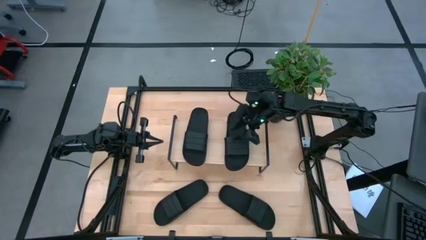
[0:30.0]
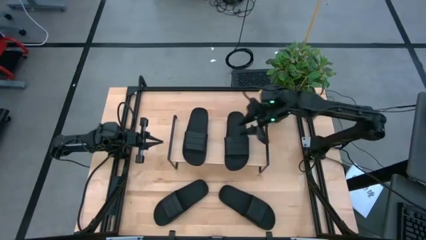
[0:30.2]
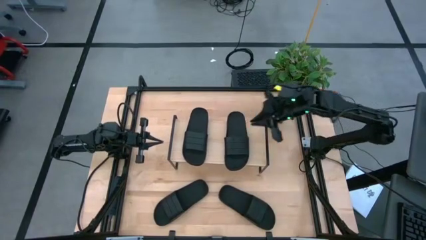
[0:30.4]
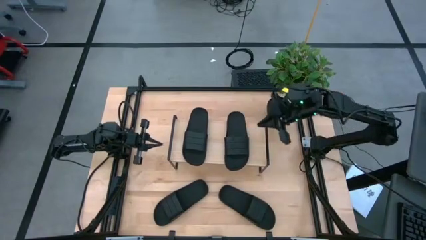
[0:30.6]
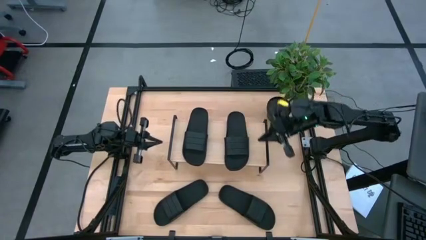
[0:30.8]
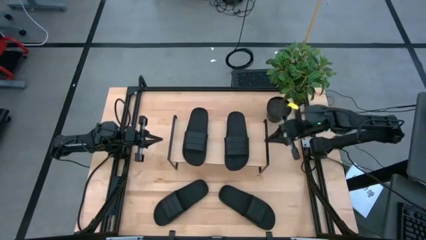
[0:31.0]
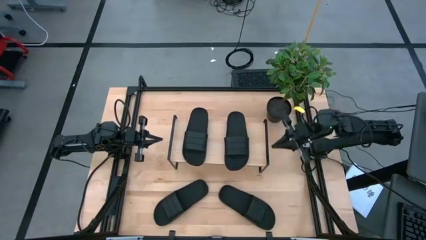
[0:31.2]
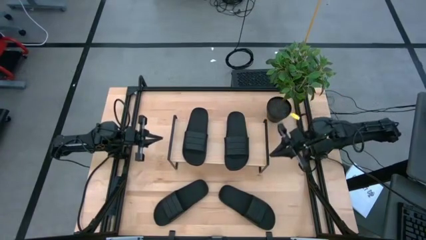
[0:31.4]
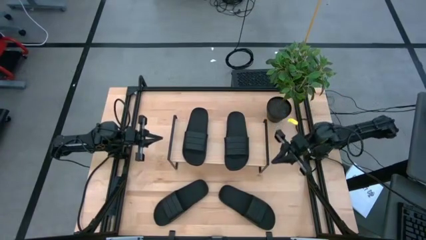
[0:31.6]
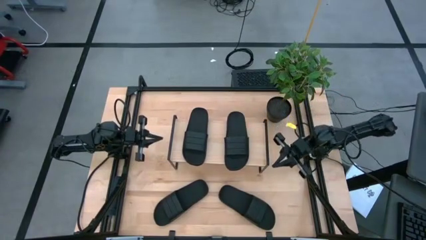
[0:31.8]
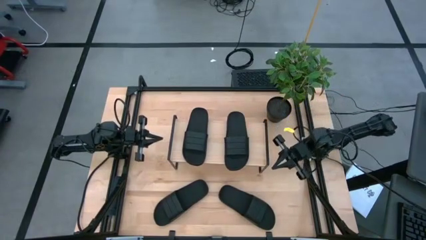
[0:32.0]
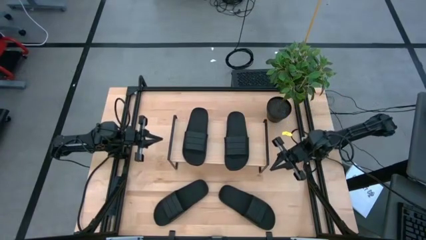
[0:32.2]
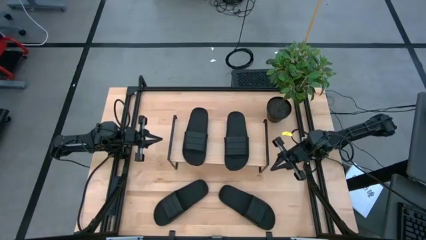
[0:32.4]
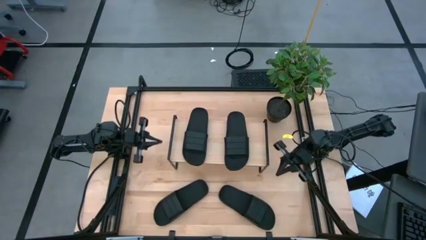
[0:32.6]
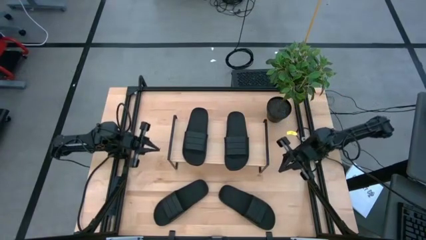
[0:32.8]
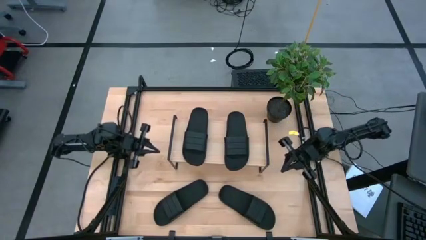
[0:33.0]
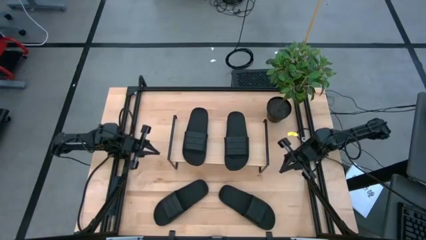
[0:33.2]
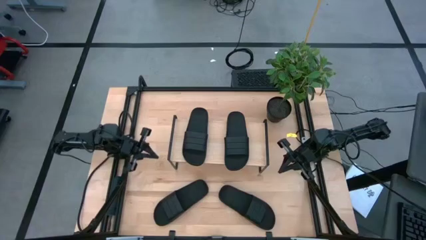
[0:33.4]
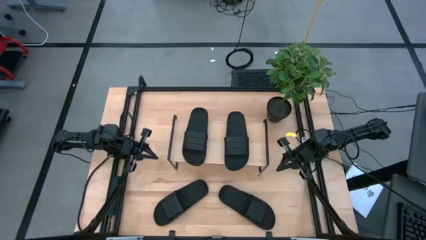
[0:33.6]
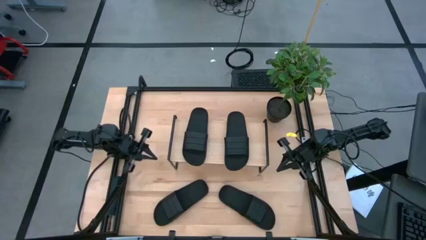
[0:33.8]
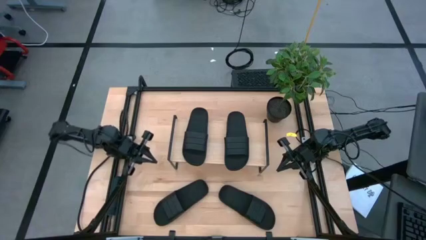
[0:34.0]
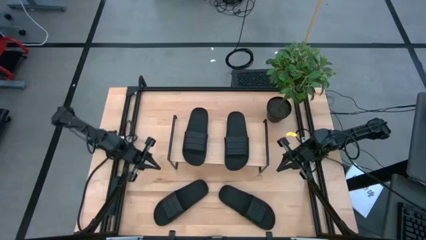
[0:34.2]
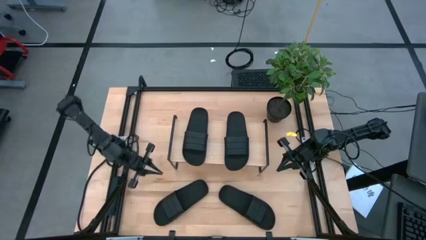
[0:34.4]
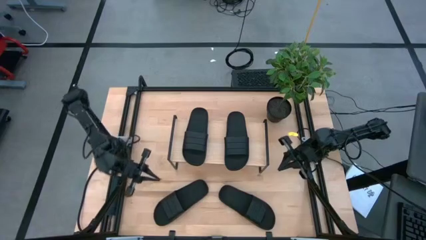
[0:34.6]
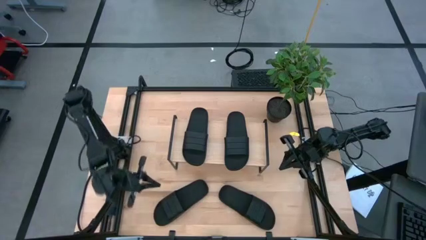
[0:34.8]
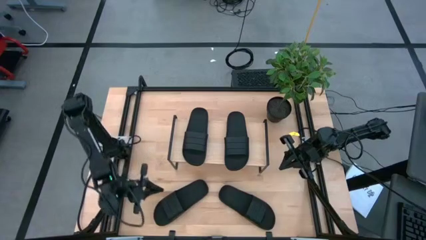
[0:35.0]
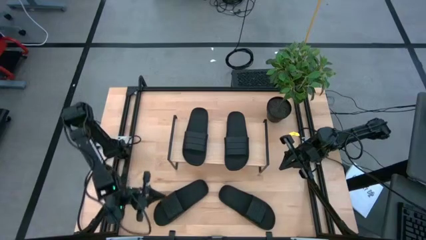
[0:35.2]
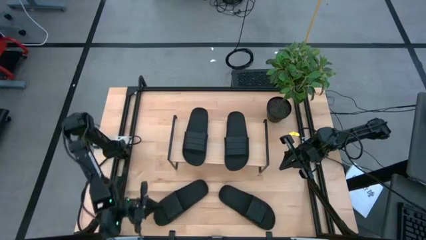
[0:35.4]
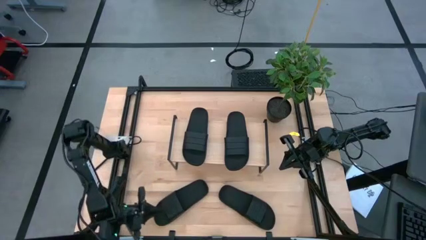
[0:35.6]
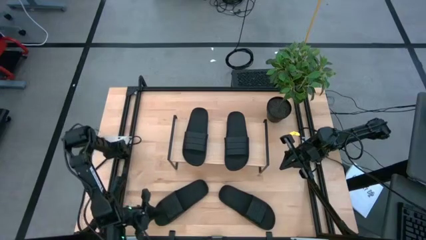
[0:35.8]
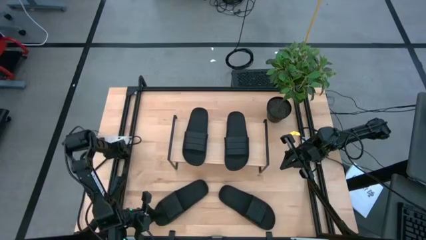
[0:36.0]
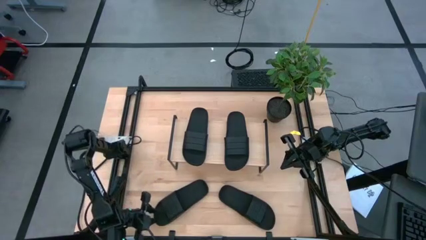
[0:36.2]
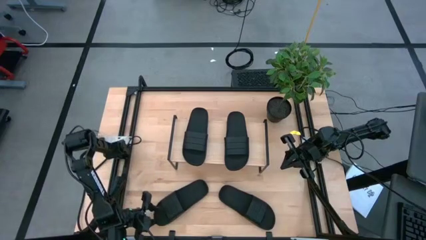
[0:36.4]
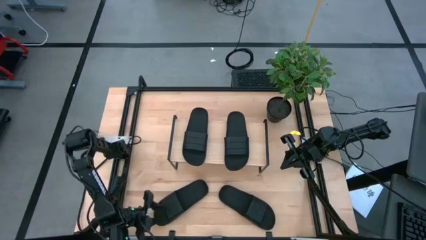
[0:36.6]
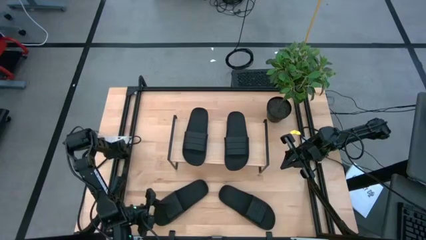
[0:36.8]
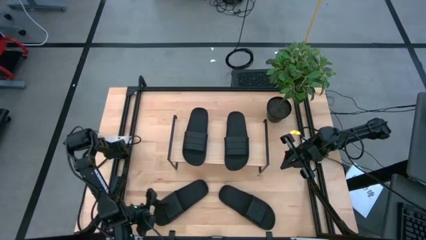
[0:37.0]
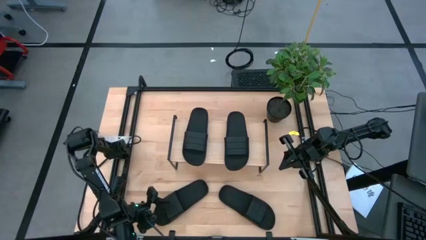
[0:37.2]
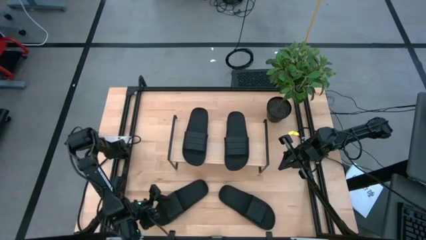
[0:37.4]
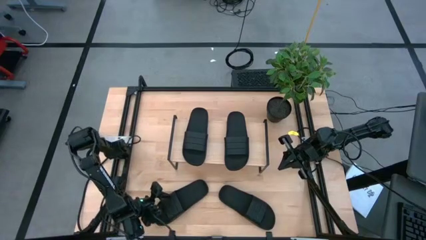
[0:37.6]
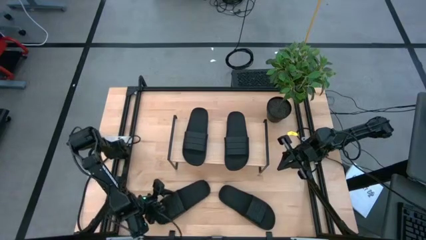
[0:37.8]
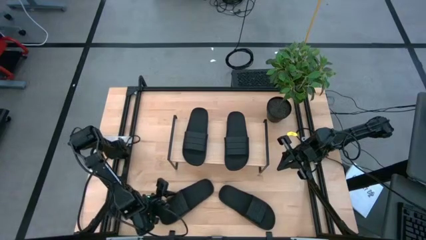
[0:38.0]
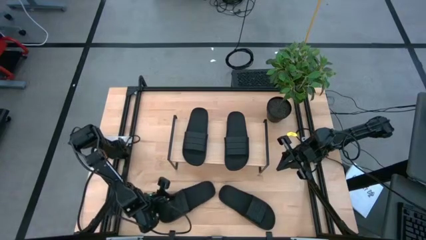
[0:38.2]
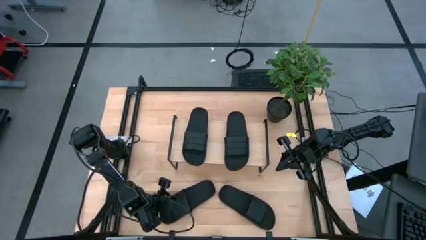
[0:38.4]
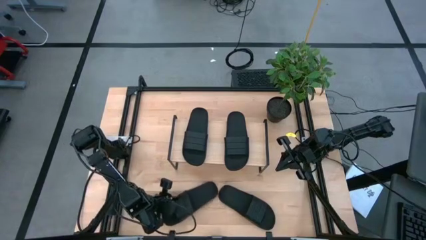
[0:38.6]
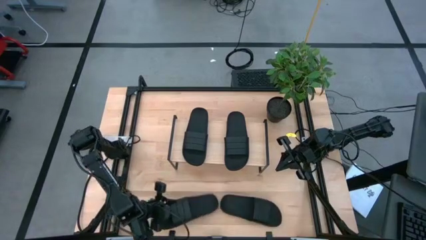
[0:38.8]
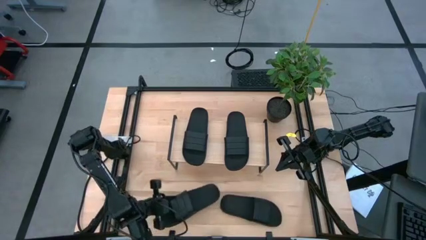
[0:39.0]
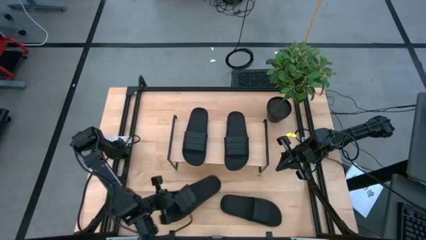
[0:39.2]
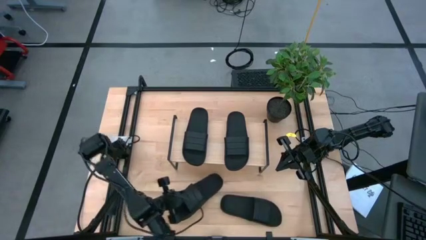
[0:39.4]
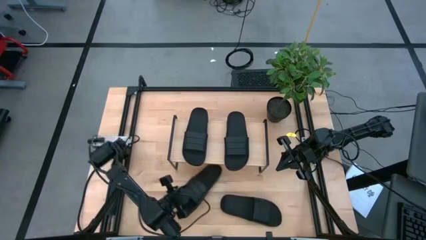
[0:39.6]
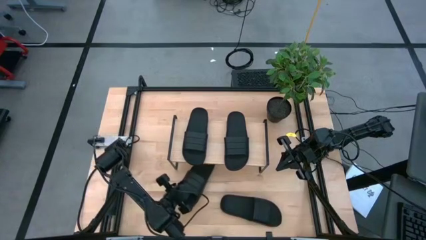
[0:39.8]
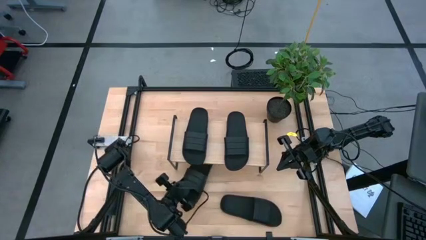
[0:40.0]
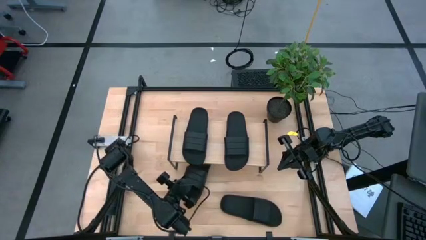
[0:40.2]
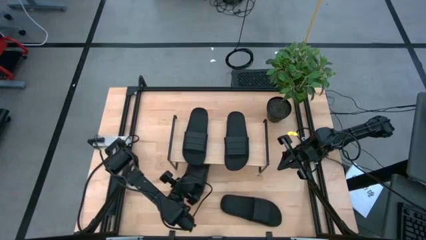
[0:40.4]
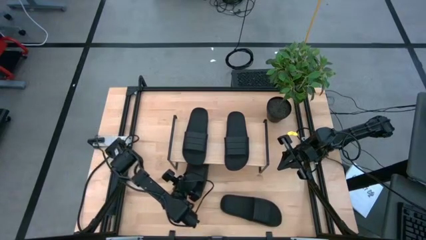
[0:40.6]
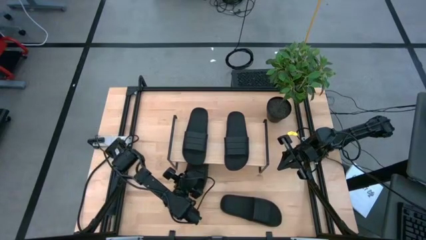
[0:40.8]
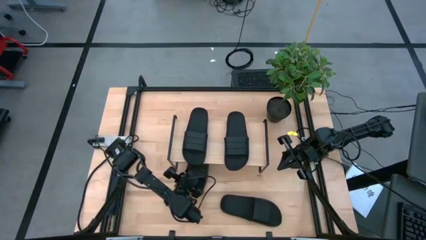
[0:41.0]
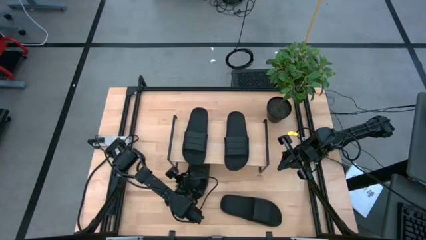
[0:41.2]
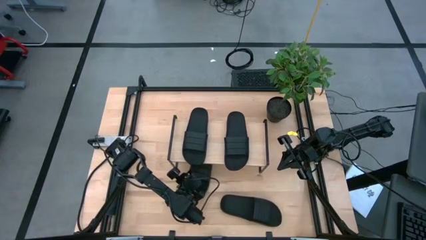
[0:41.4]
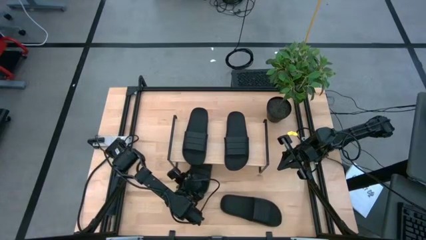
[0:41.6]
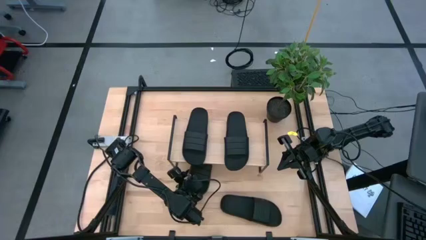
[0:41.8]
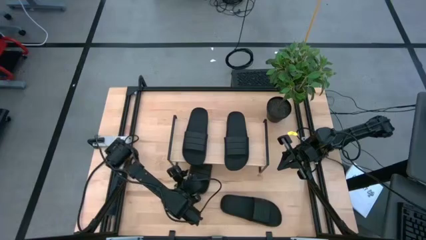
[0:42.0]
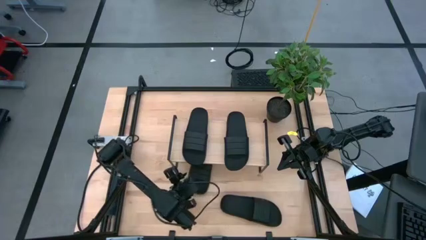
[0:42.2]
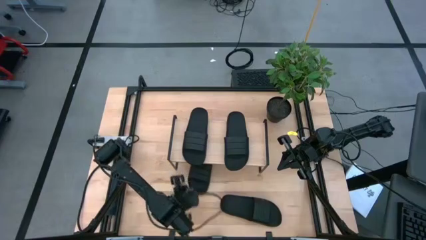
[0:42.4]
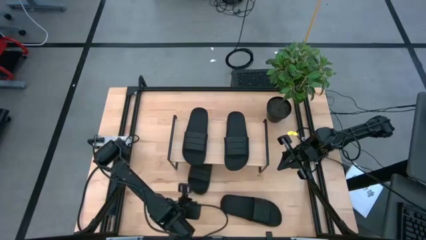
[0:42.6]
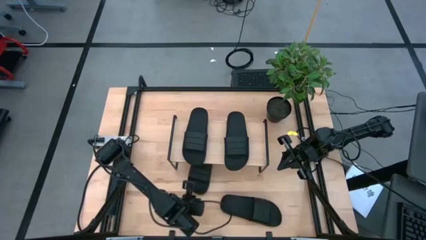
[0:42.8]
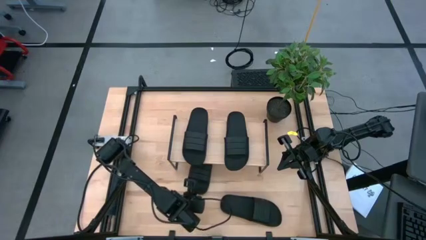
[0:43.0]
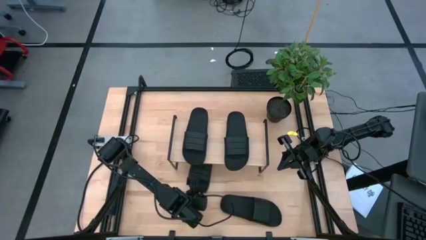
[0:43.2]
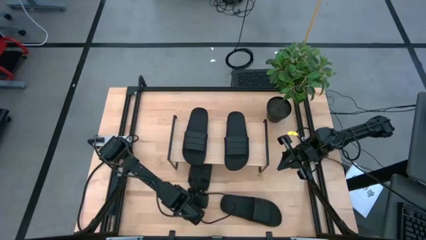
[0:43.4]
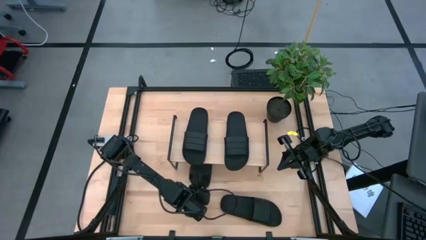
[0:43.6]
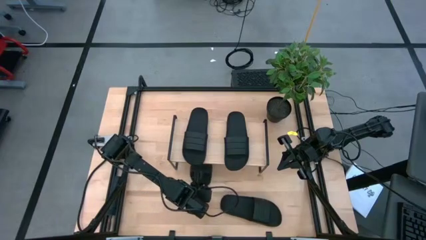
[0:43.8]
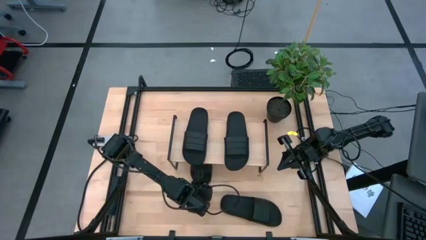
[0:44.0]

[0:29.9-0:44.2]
Task: Pick and place slides into the shelf
Put the left black slipper under the shelf
